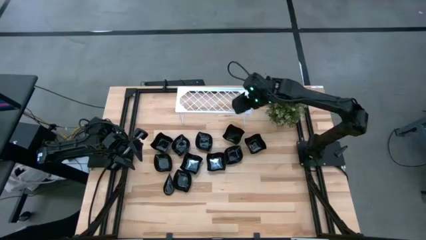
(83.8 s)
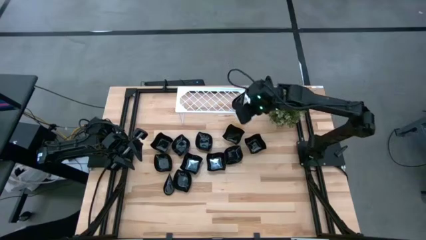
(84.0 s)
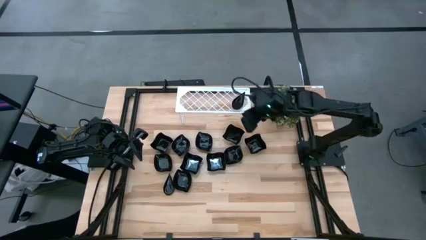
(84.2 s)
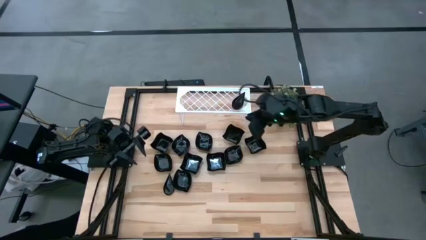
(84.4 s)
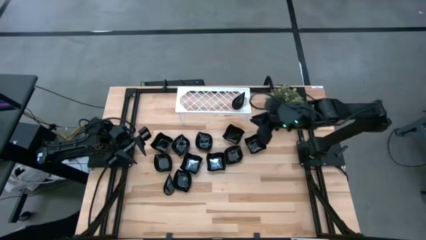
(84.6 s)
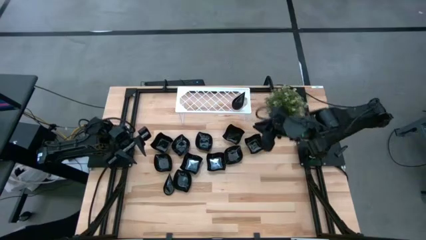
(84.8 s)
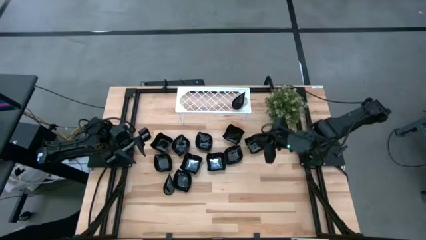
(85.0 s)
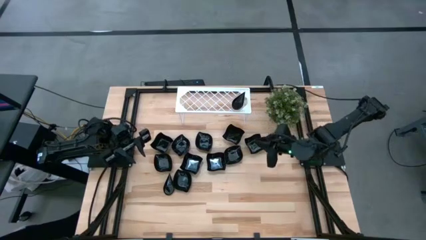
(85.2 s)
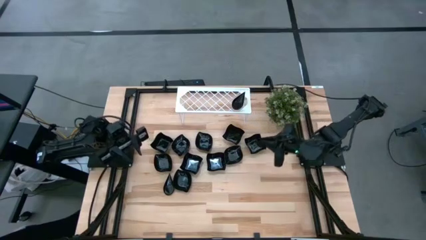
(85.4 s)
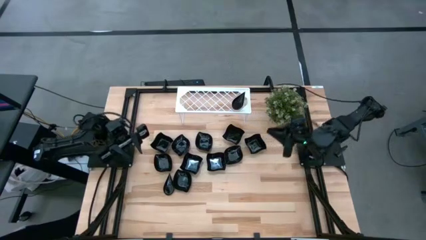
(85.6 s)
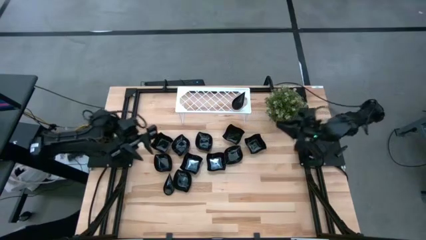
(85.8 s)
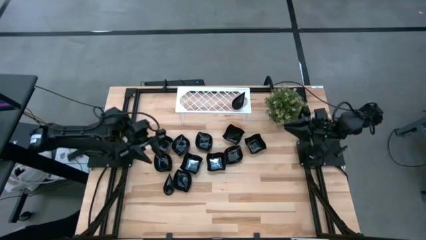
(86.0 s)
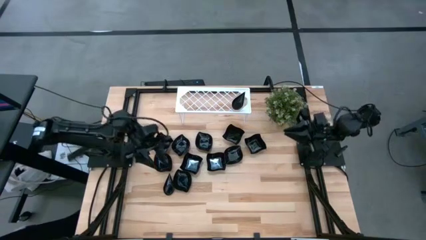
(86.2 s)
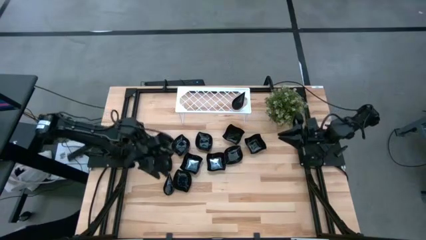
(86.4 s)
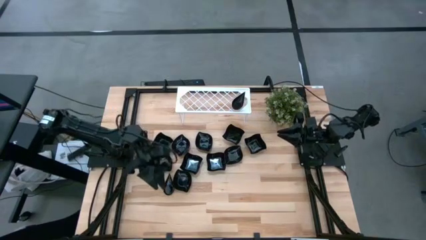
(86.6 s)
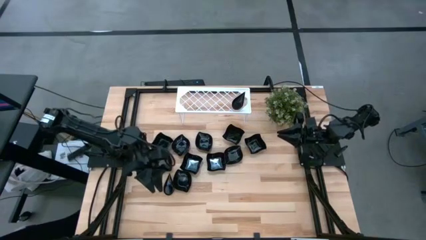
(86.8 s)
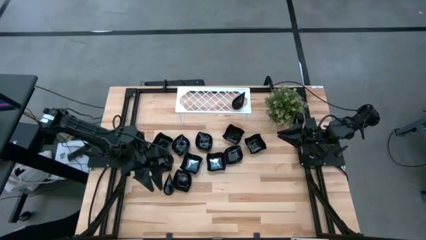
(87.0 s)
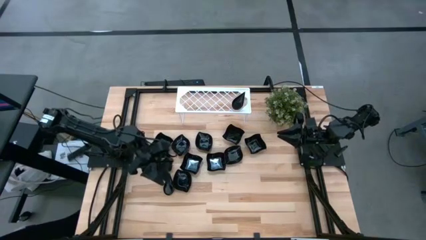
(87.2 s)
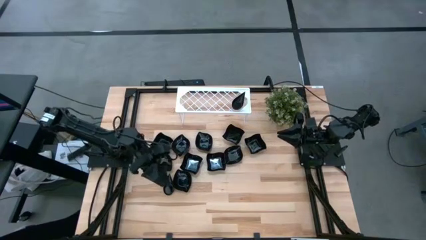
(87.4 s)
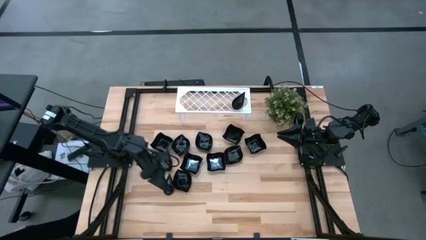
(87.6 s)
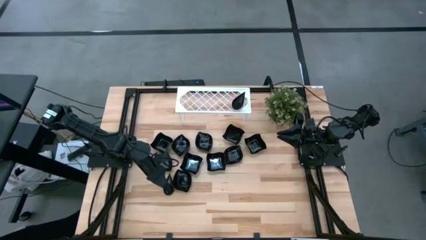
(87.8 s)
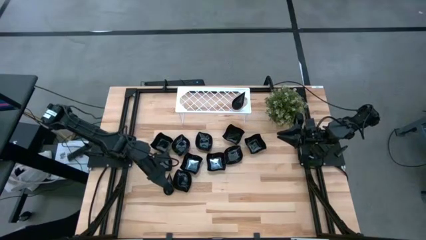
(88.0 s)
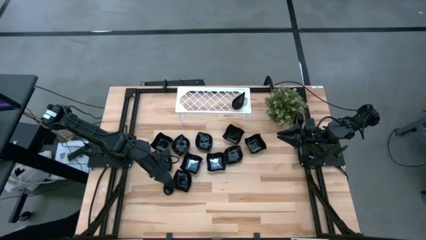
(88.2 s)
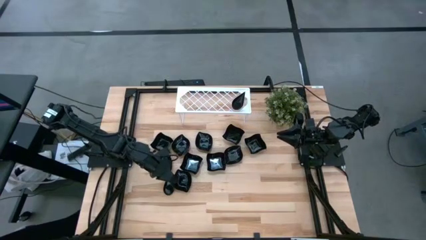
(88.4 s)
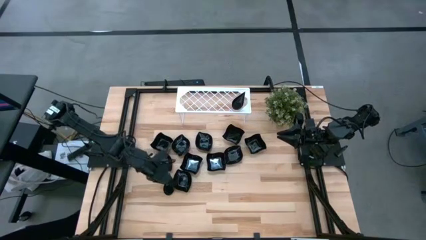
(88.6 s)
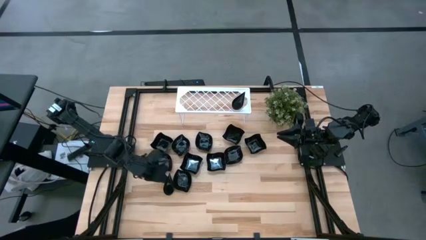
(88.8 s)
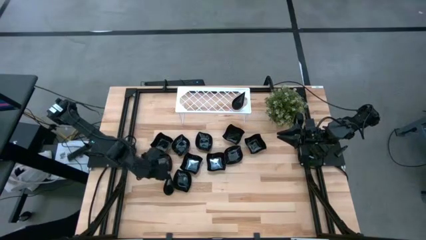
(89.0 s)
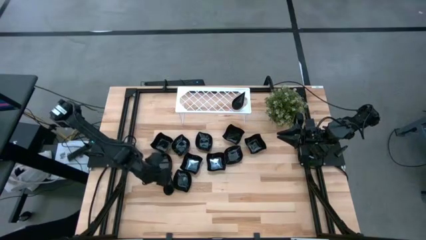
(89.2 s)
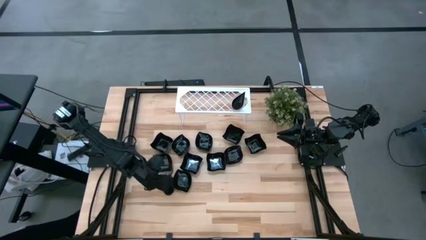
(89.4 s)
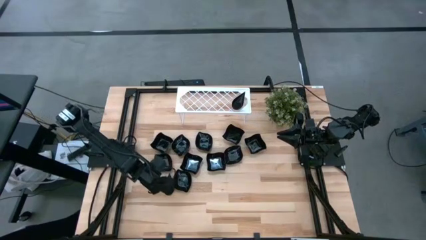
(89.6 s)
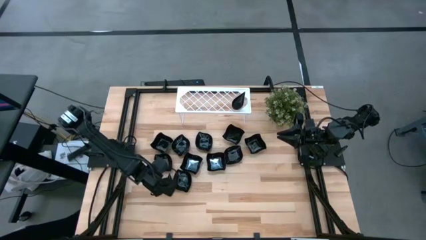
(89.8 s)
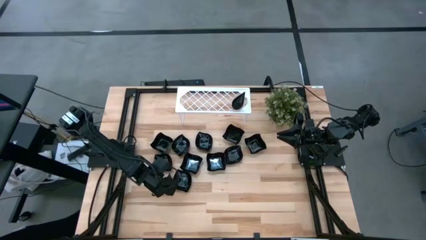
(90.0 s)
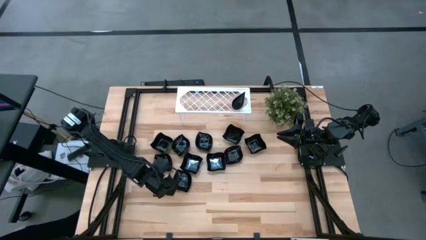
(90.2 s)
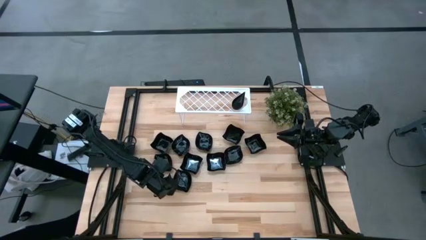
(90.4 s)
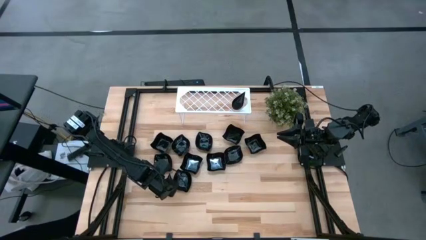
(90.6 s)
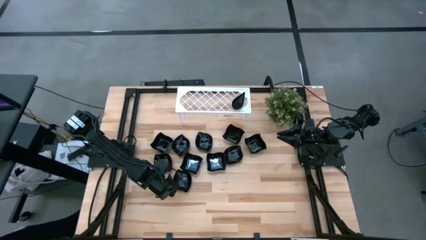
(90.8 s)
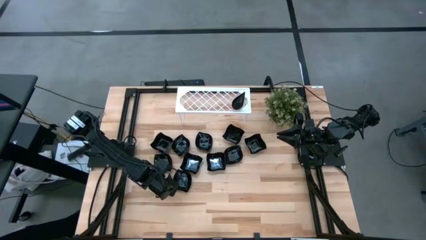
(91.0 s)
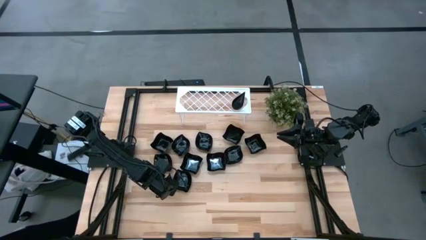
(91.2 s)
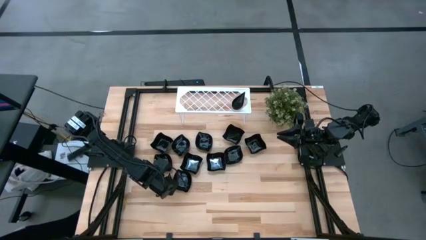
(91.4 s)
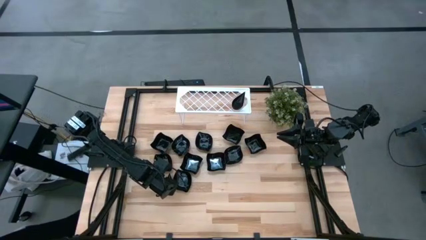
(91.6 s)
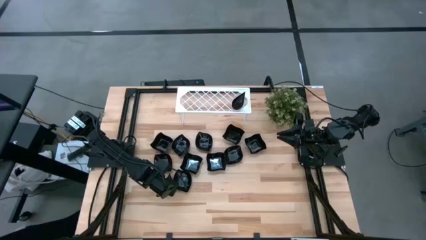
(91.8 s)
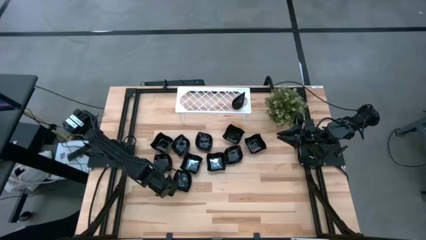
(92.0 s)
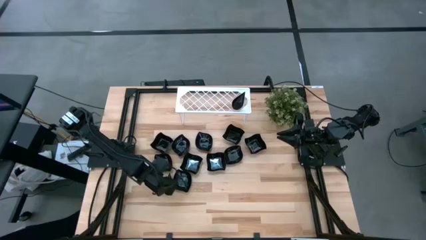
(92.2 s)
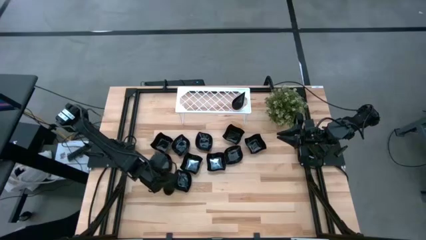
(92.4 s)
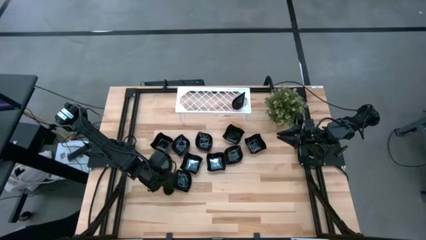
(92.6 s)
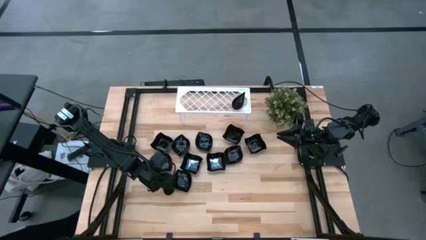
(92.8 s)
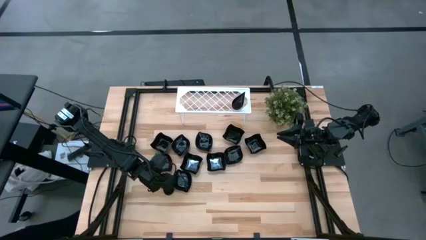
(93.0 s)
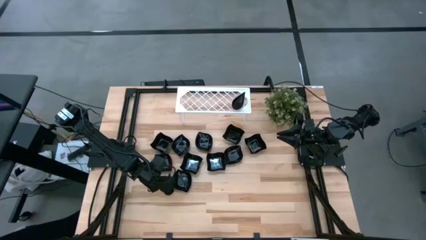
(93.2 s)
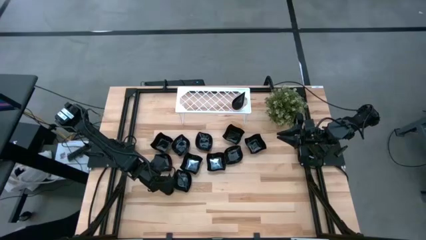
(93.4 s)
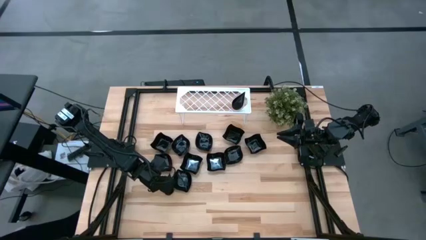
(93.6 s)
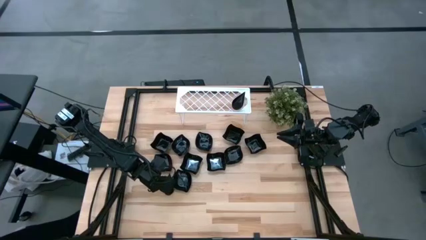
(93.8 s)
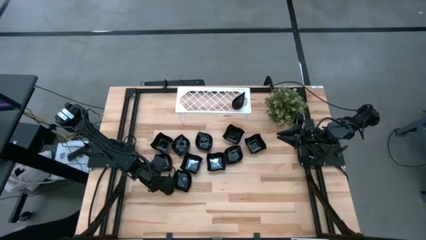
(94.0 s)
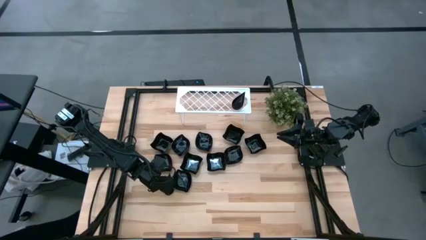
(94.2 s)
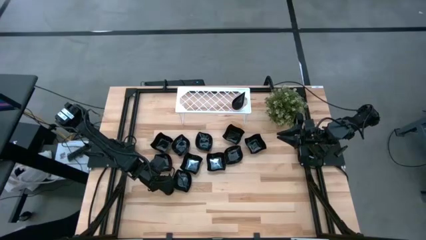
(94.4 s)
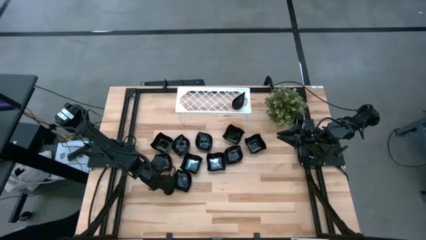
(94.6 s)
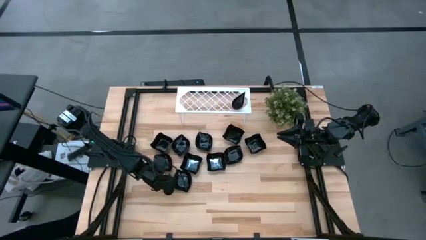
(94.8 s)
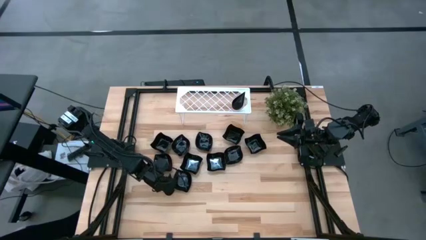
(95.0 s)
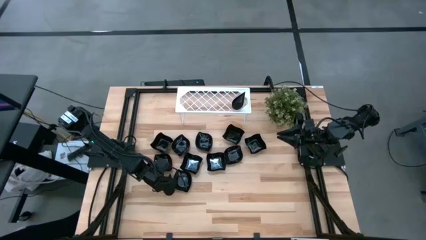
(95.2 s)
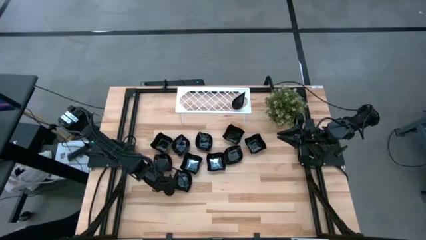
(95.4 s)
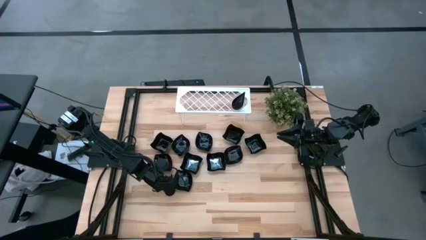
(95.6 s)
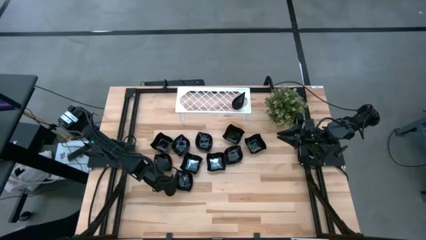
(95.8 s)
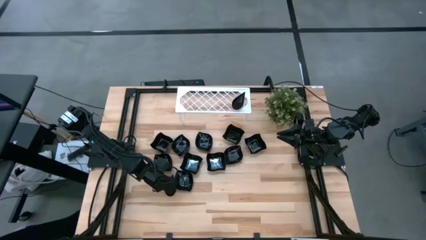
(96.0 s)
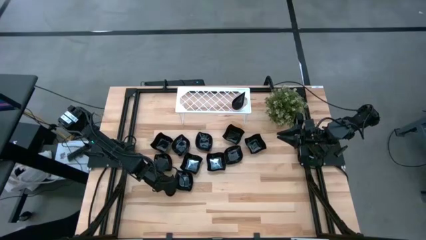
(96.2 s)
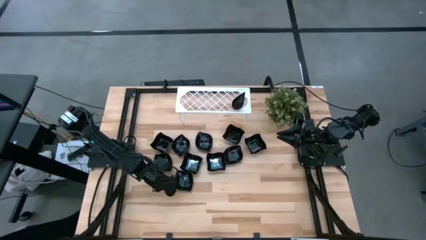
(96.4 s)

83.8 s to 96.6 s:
Task: Pick & Place Mini shaped plates
Stack the drop-shaped plate on top of the drop-shaped plate on the shelf
